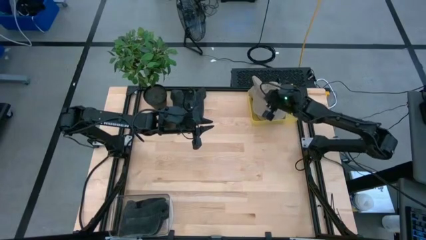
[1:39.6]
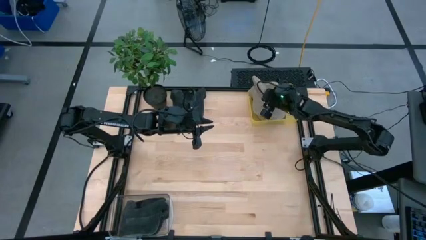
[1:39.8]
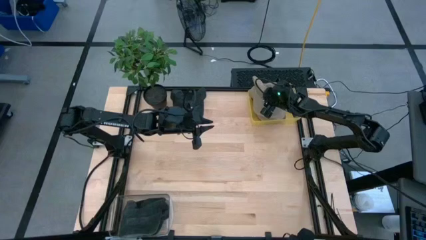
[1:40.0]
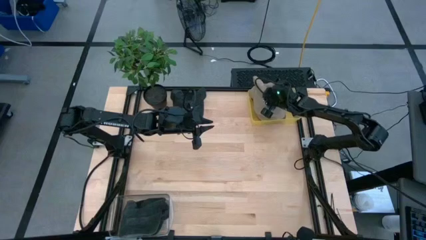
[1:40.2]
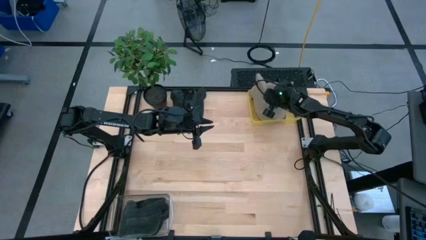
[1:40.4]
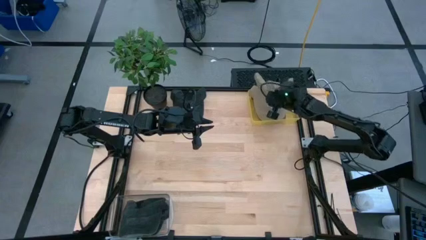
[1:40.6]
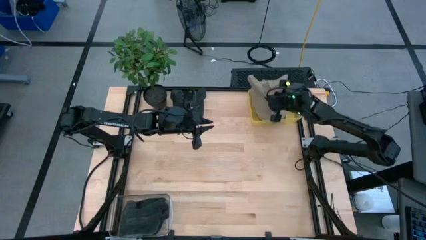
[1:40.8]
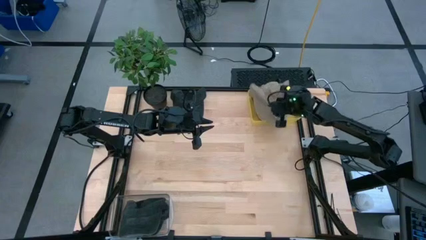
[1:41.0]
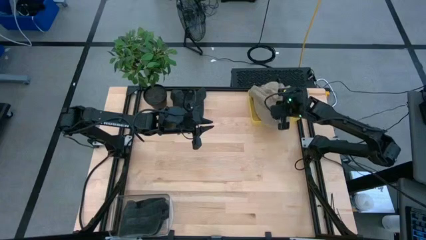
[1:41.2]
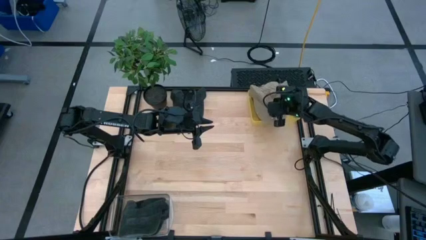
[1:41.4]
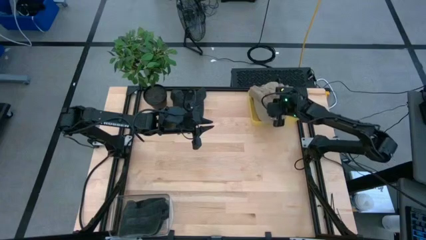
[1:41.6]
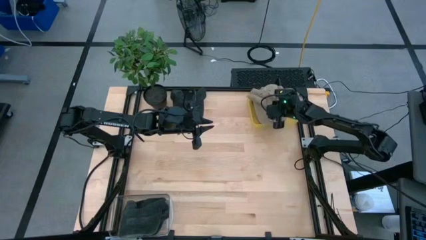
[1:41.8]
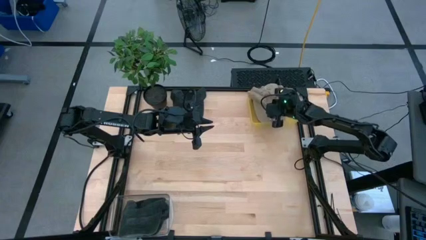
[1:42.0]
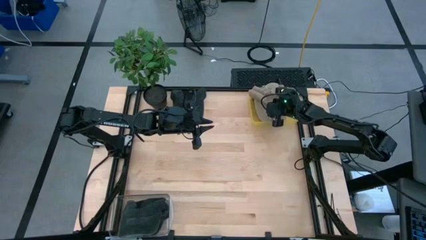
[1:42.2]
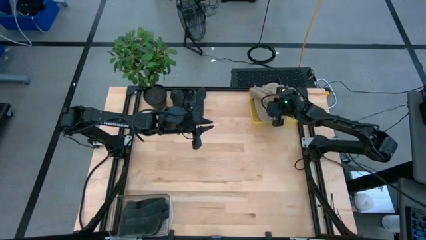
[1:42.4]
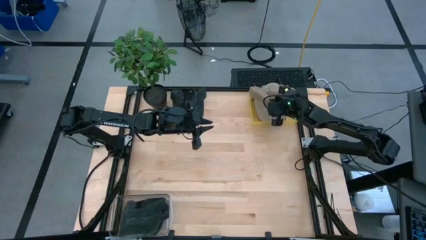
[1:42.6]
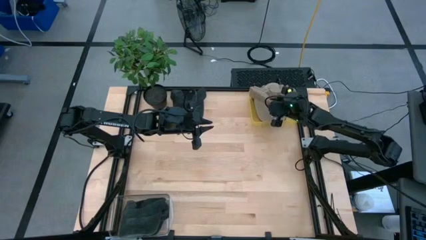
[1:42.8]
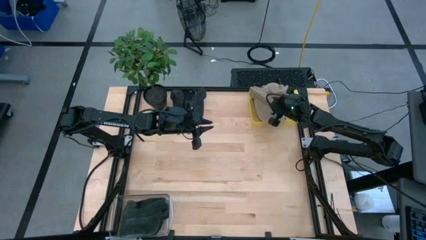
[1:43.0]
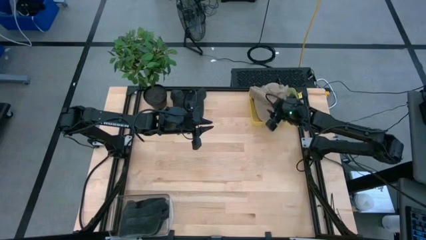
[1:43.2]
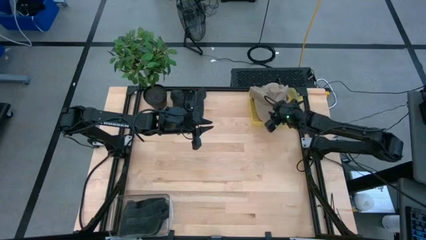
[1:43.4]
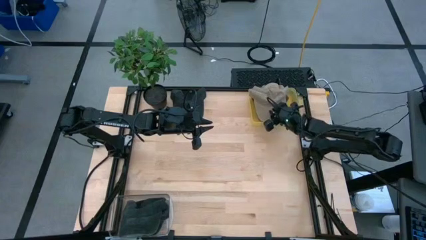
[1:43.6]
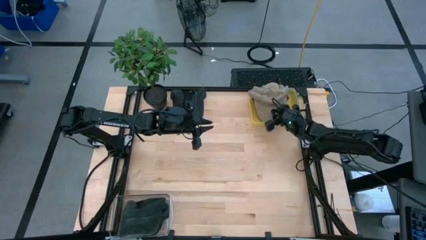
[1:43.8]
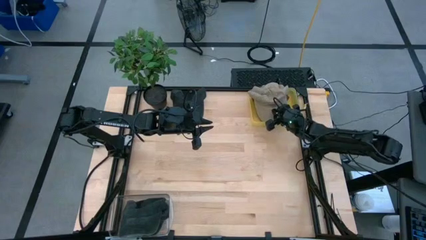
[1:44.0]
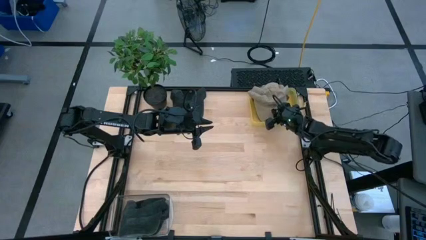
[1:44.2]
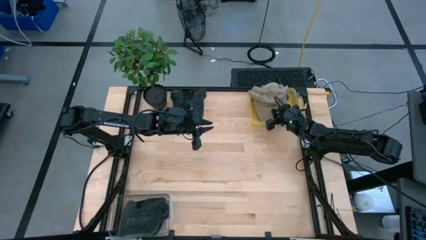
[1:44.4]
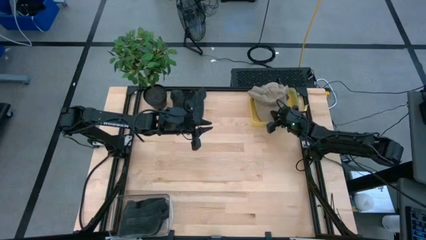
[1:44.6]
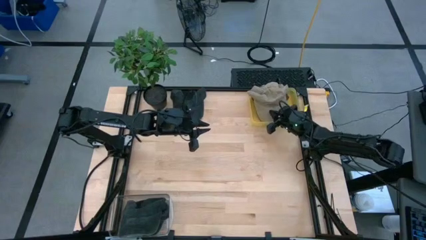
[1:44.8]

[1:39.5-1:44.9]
Task: Pick & Place hat
Put the brown cap into the yellow bin

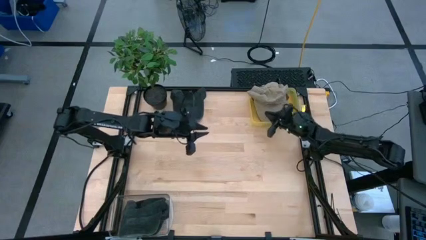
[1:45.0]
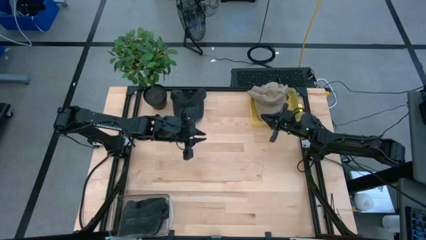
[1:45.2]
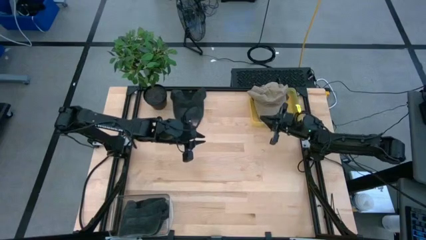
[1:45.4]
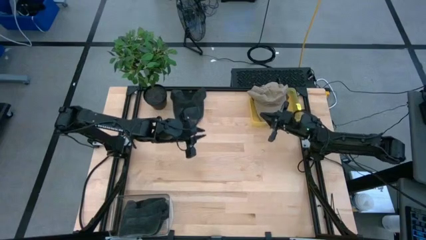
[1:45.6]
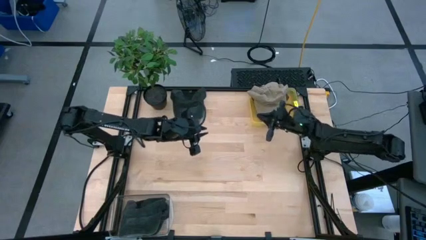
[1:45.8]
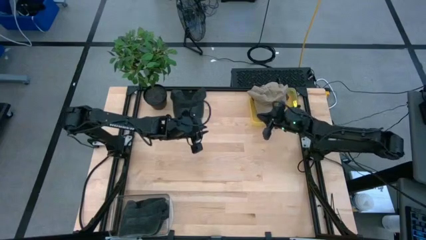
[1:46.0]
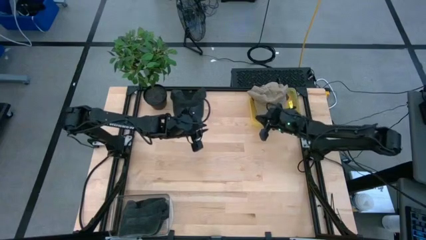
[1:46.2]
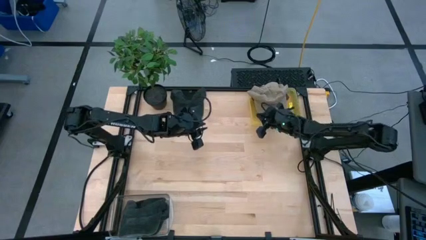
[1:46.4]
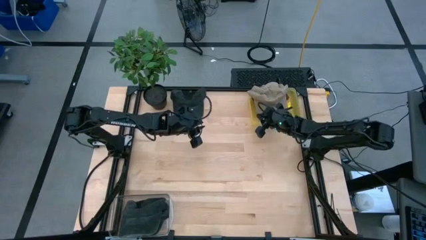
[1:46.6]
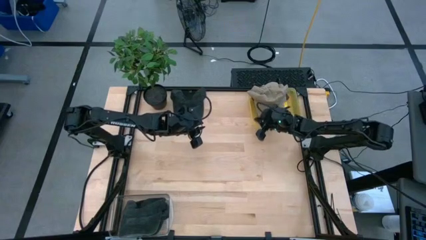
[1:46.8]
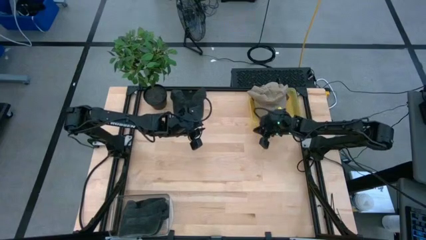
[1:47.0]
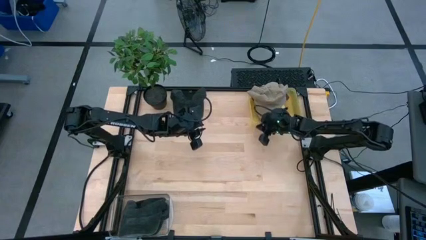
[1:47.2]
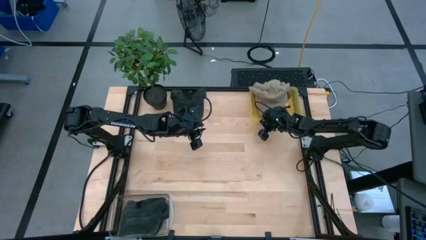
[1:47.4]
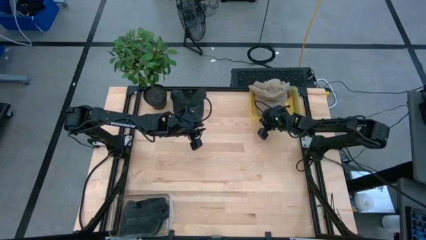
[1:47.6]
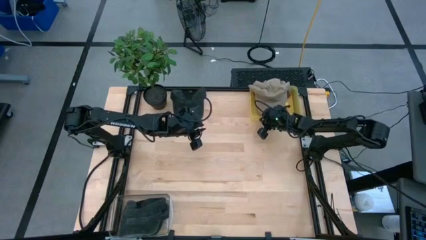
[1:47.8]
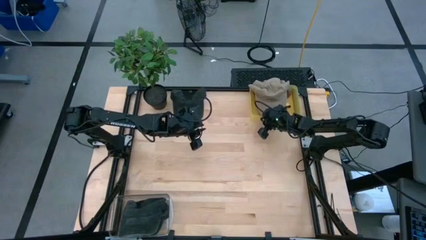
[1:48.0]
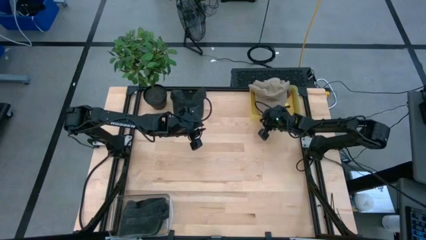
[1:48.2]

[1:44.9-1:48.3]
Adjust the yellow bin

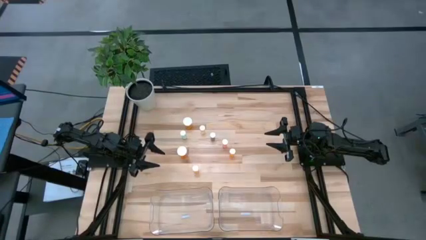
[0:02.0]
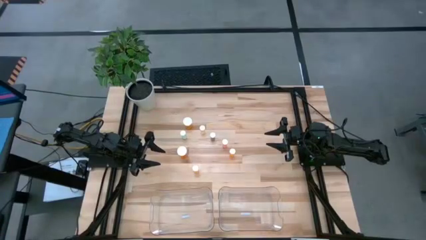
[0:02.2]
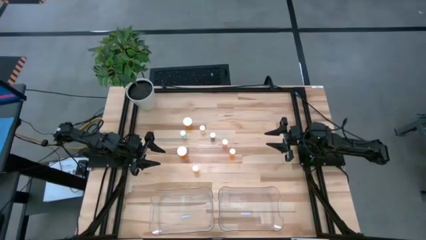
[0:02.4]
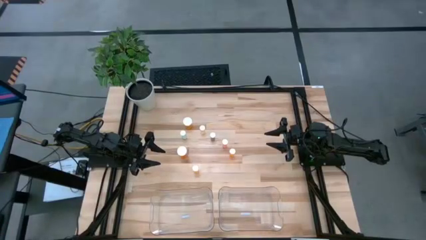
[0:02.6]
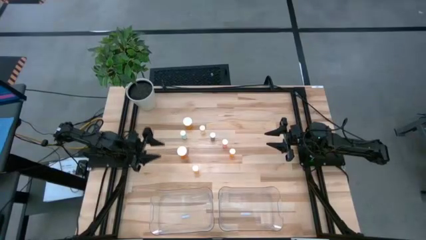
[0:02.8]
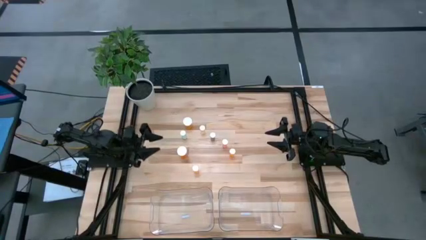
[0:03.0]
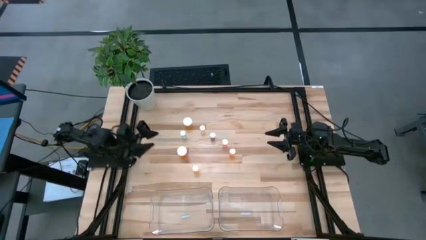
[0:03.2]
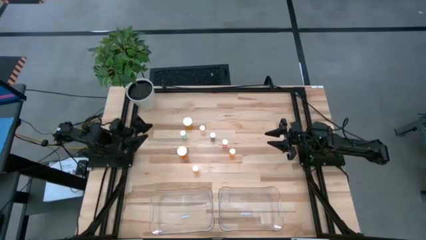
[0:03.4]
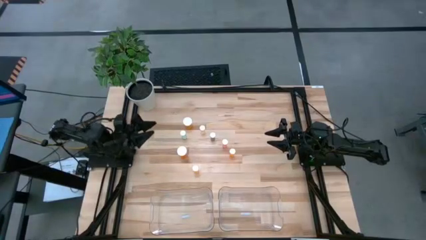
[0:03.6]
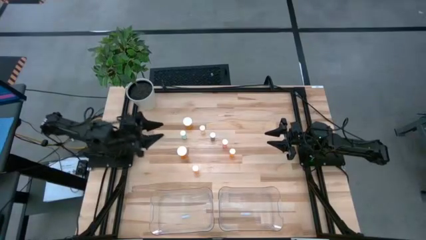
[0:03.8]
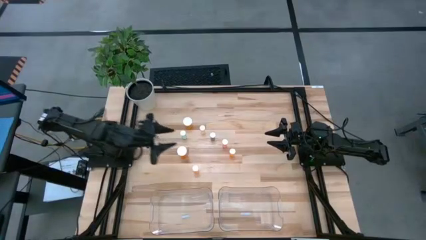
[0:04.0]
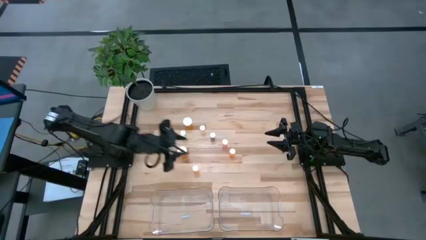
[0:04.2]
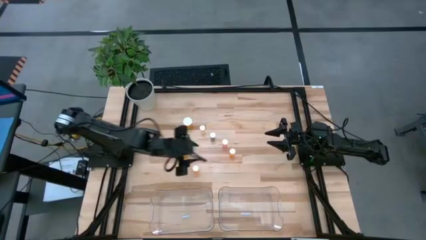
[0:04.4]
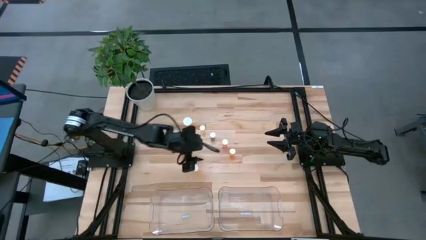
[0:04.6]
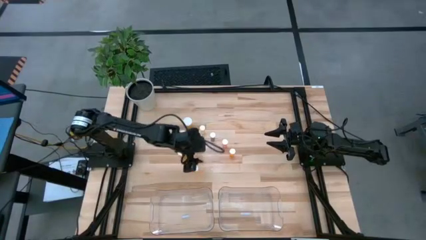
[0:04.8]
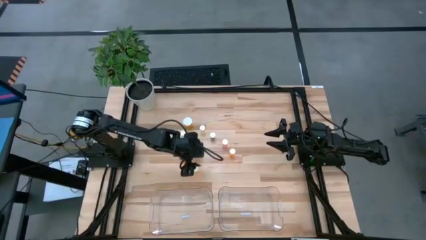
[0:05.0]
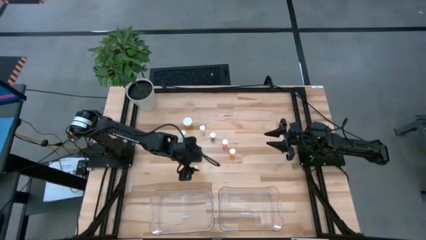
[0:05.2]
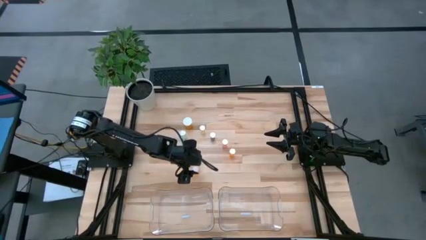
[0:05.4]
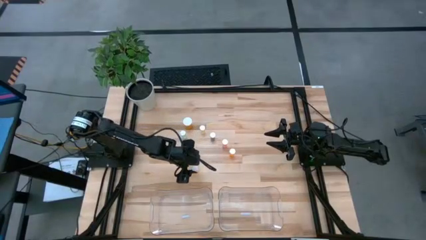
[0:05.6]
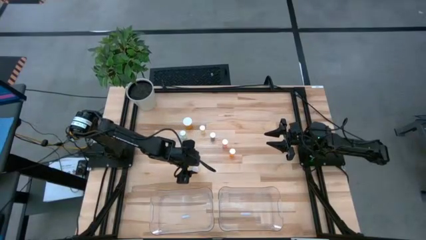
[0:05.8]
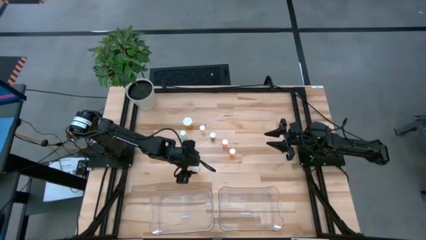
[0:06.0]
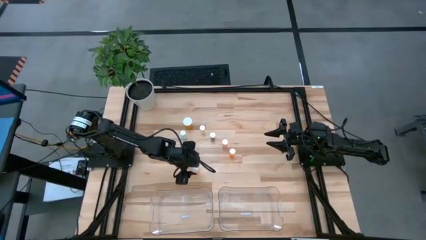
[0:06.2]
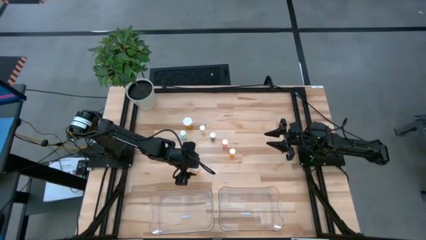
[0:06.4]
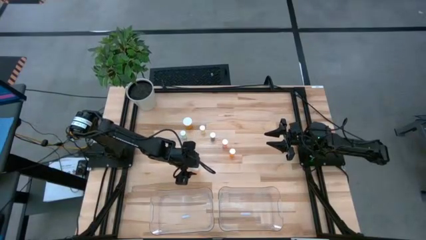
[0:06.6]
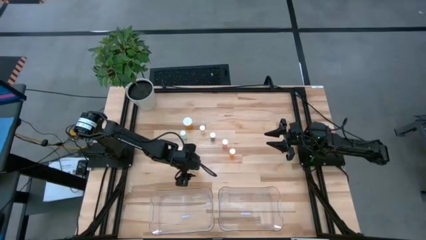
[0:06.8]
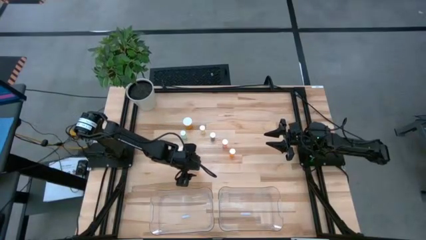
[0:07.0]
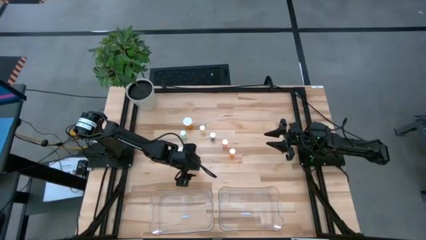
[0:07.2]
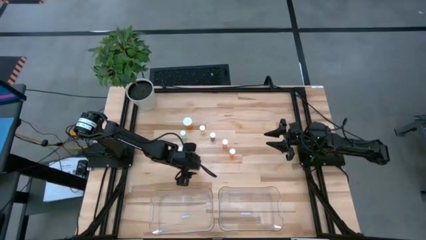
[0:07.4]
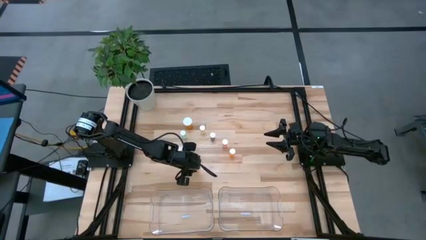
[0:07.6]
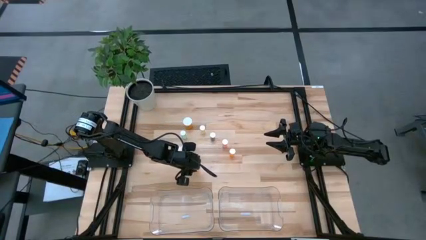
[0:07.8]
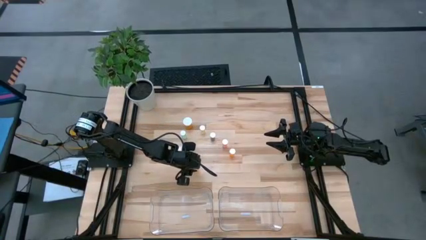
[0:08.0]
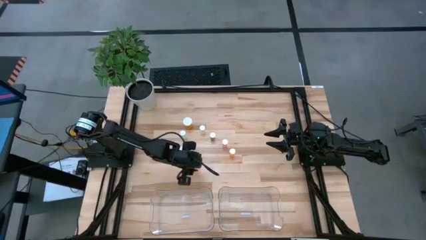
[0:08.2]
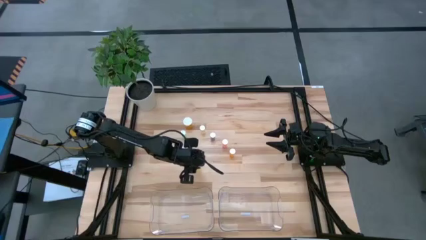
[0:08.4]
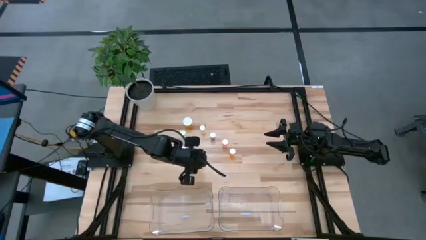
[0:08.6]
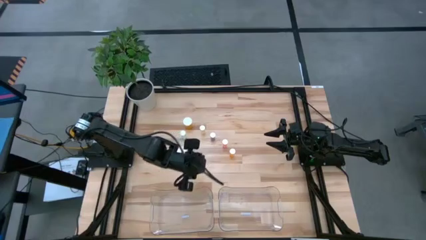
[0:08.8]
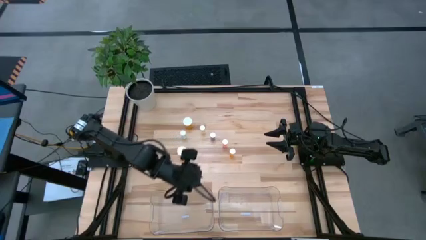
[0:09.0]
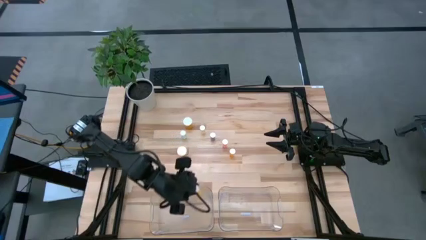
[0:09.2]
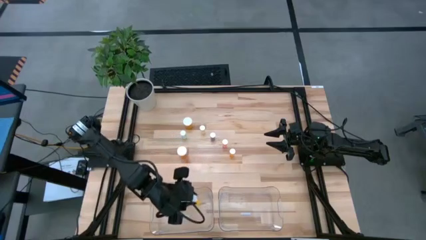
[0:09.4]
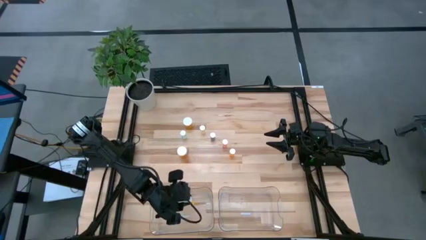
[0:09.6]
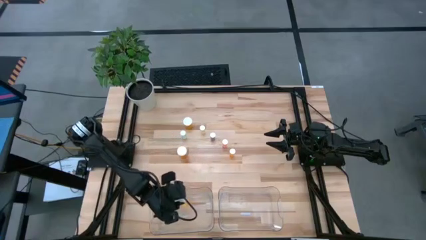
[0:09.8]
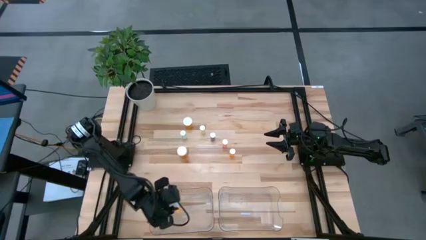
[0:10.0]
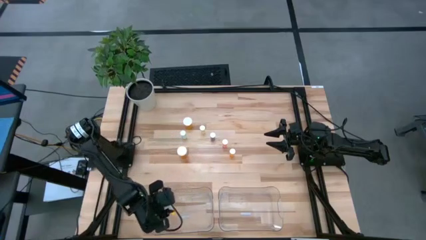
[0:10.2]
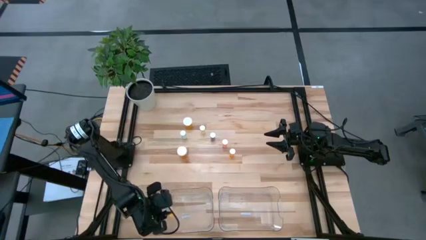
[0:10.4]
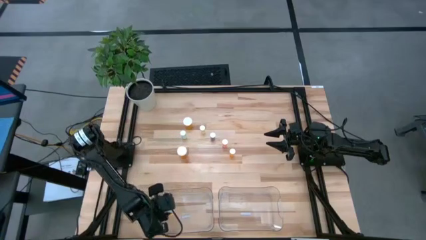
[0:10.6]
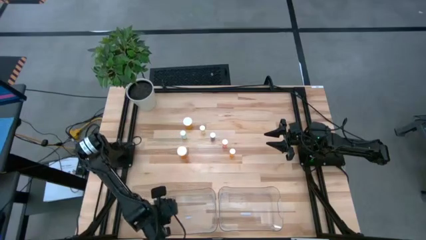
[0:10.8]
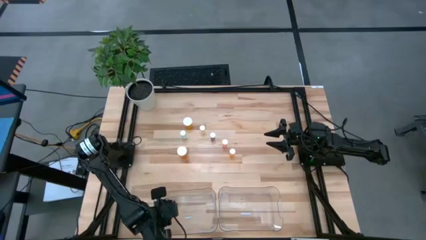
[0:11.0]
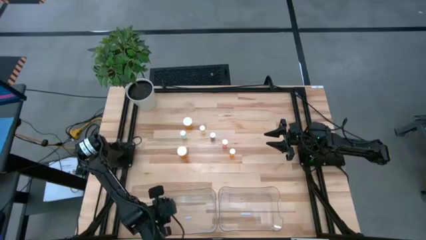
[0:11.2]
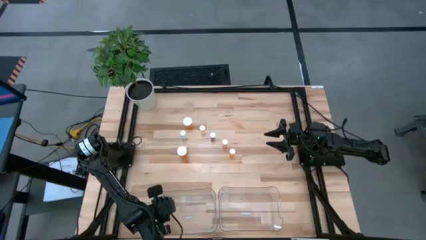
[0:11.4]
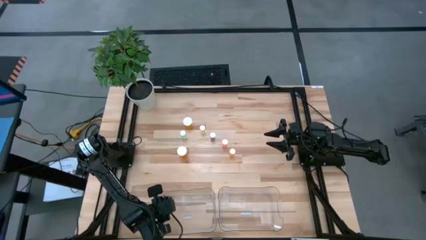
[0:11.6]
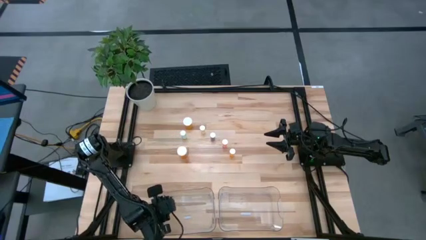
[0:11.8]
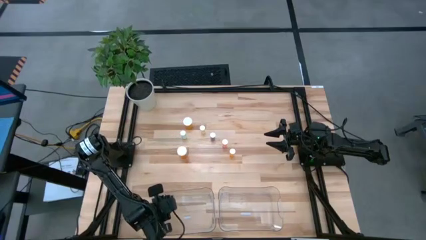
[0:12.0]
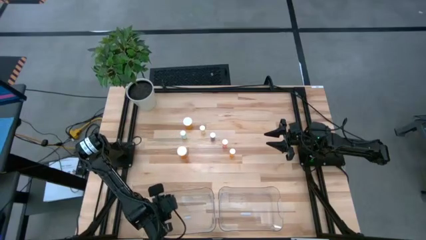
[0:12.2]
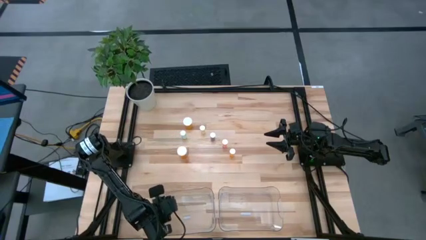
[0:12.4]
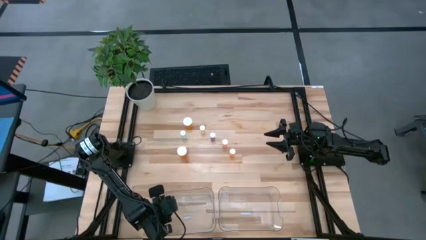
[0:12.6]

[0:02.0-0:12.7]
Task: Pick and place medicine bottles into bin by pill shape (circle, oval)
Put the orange tablet bottle into the left transparent bin
